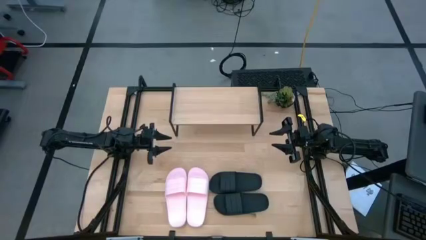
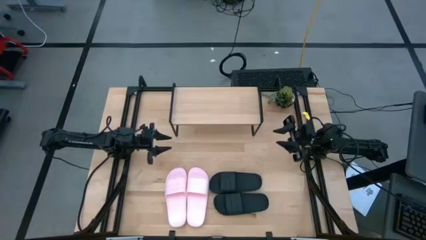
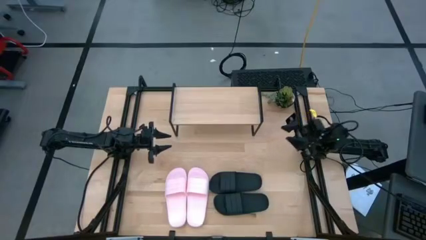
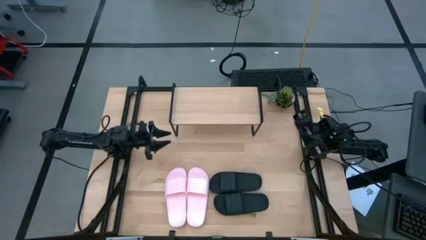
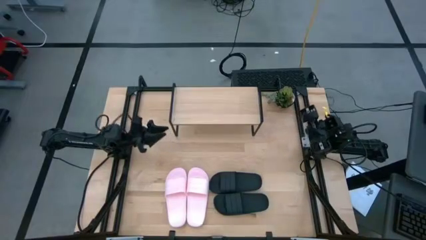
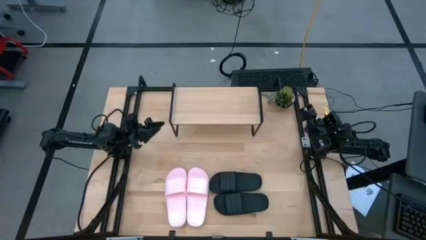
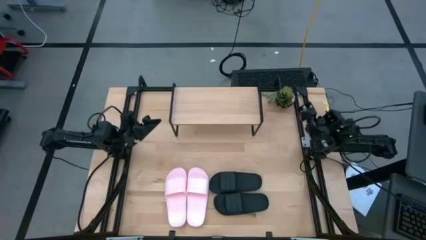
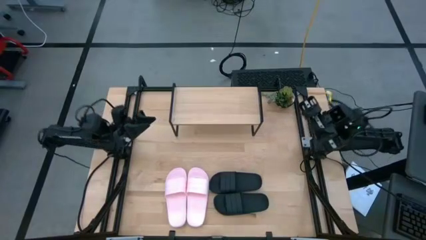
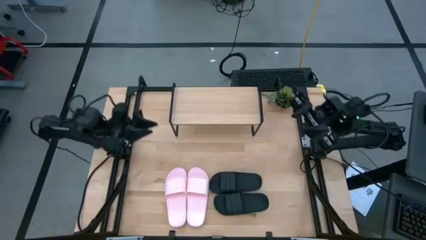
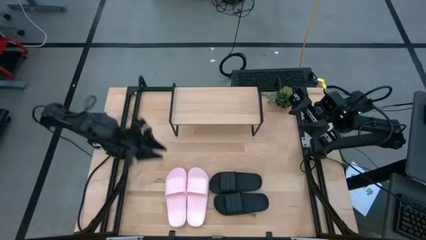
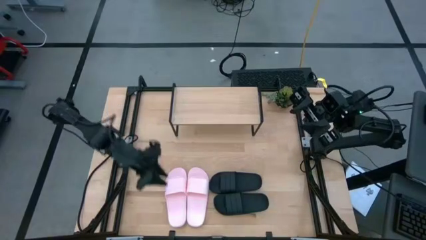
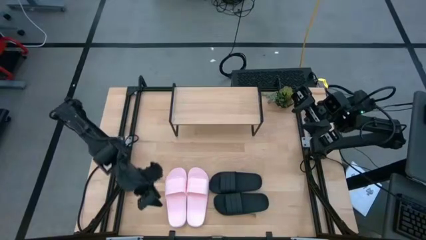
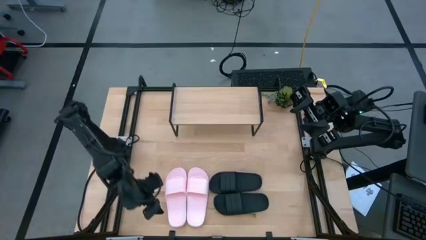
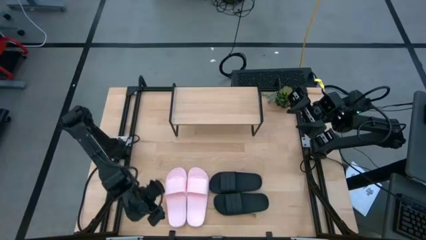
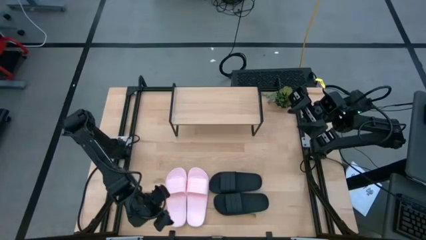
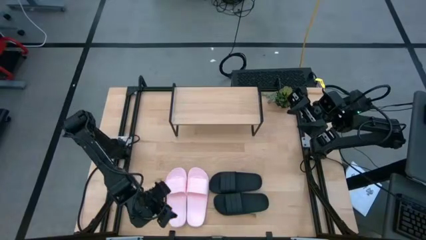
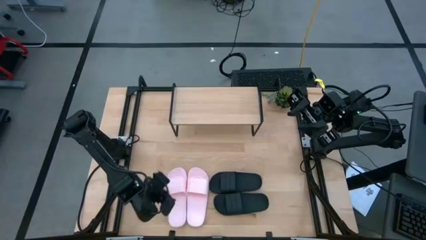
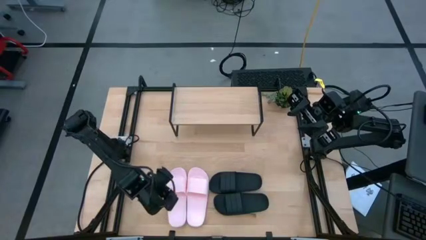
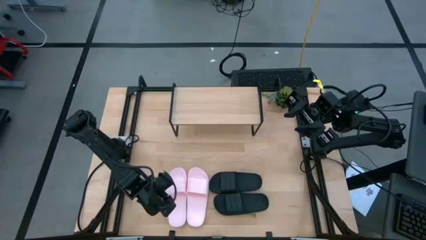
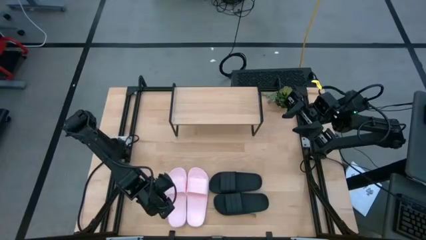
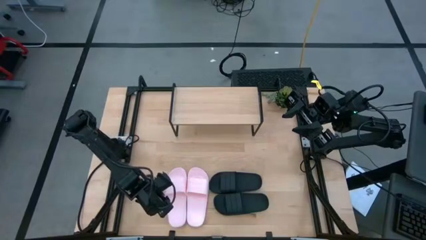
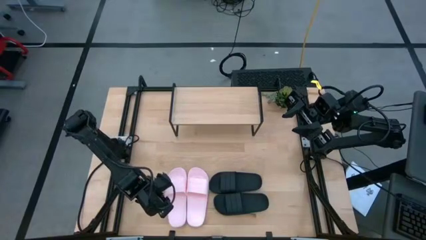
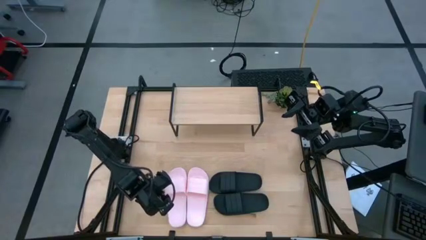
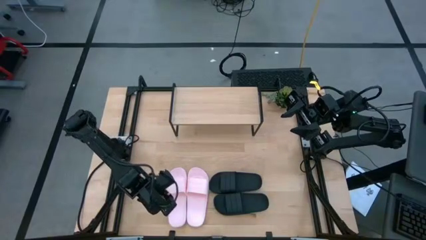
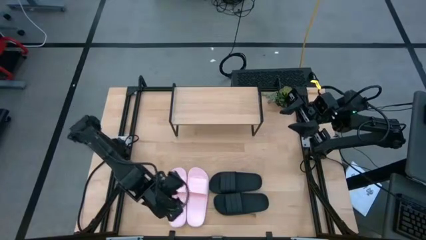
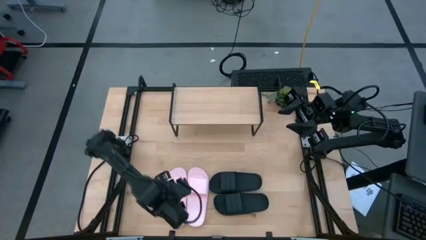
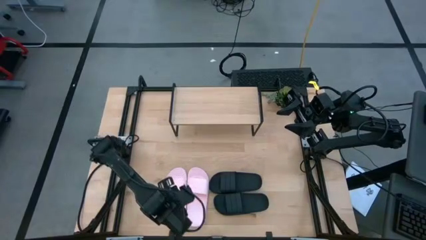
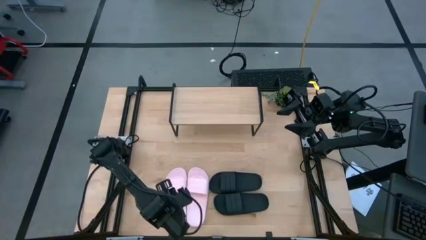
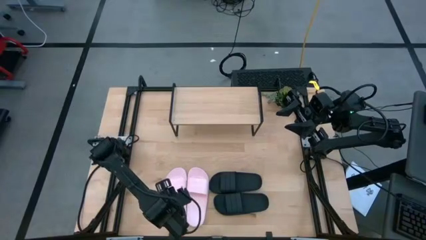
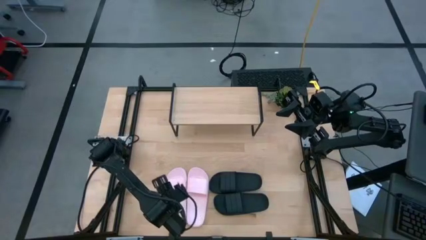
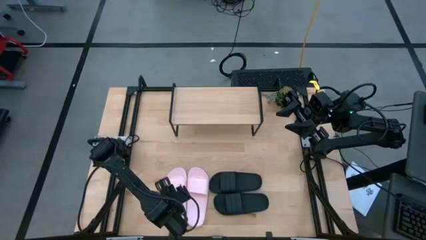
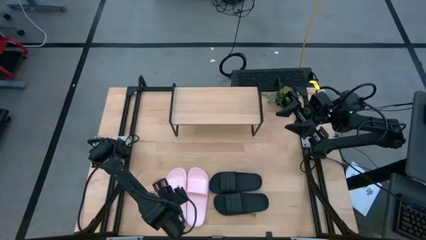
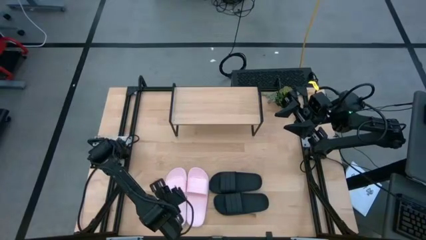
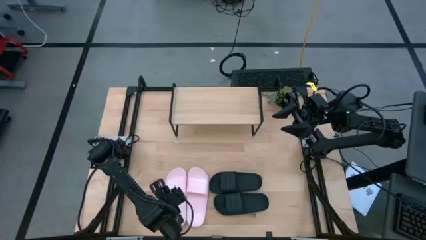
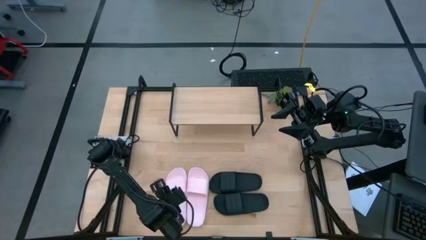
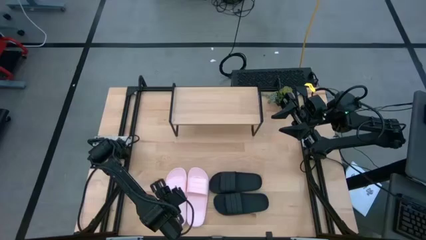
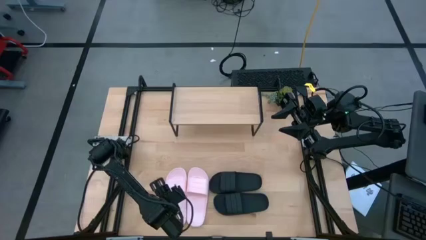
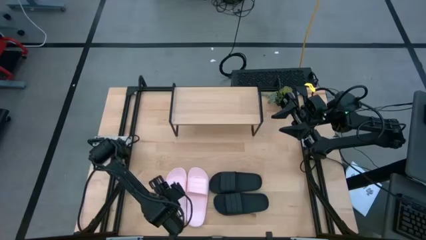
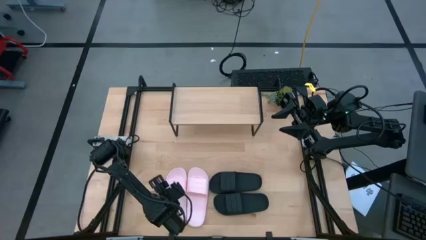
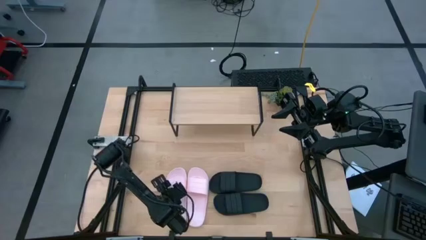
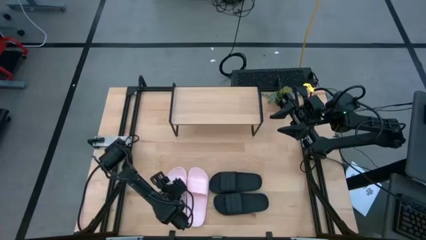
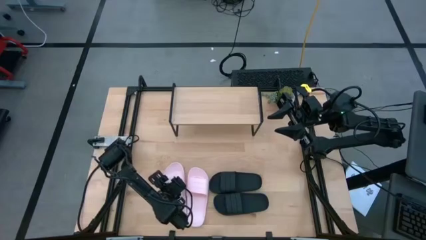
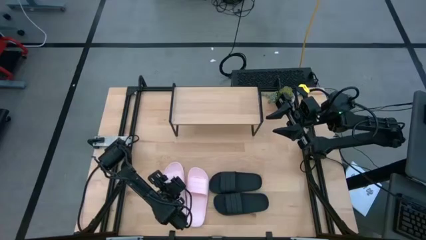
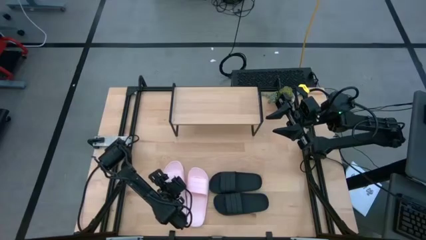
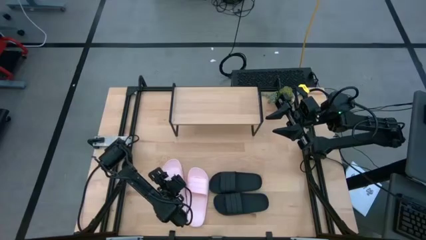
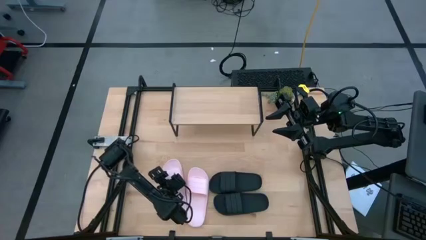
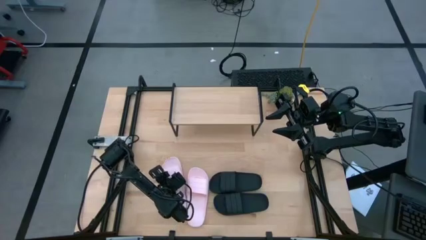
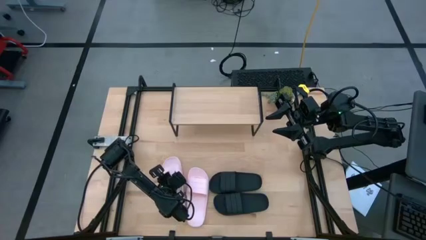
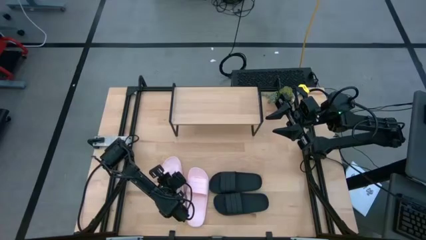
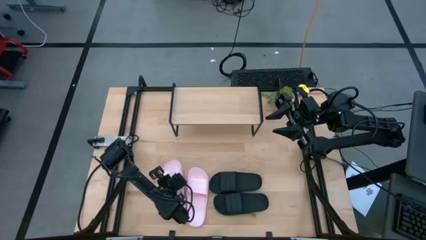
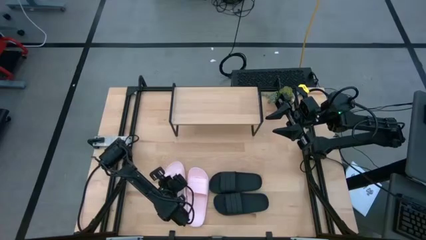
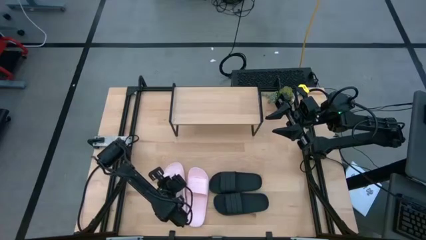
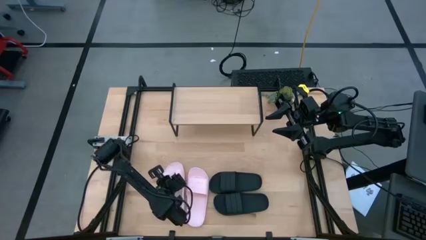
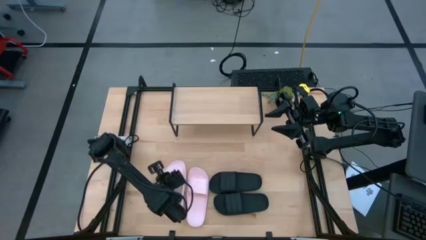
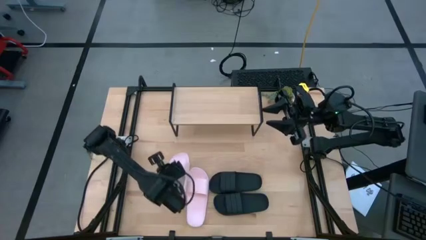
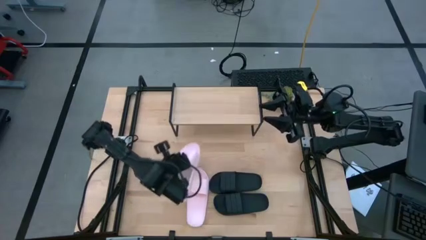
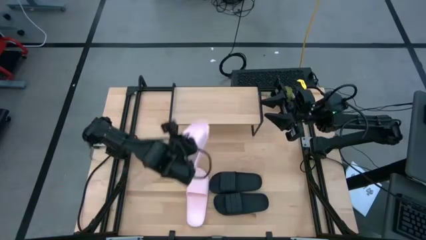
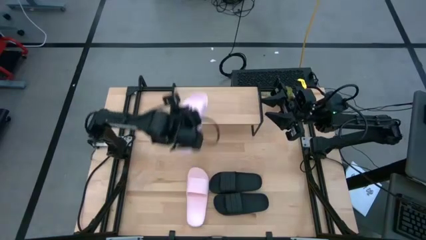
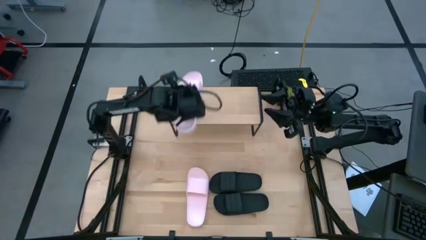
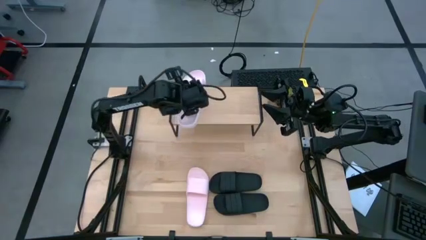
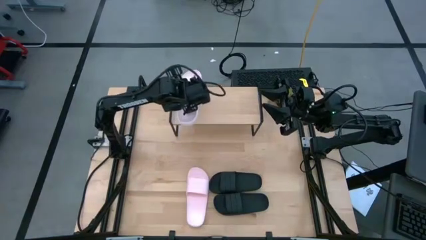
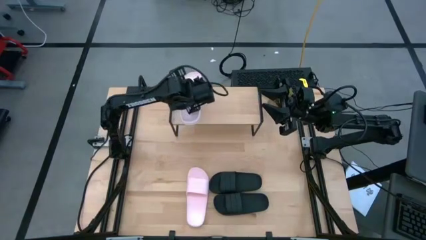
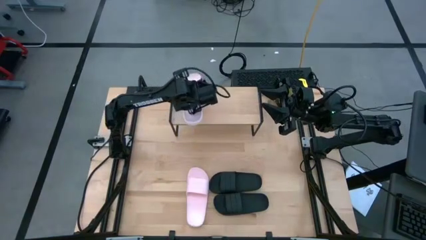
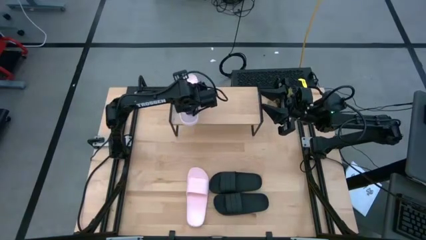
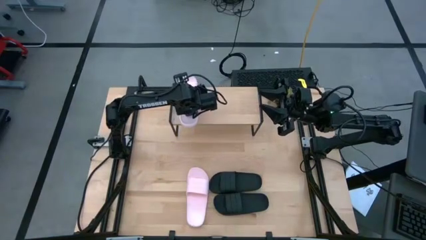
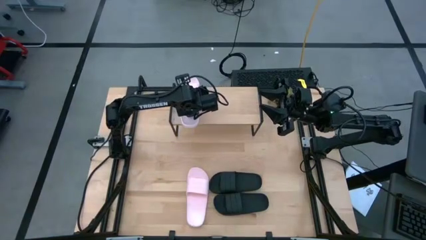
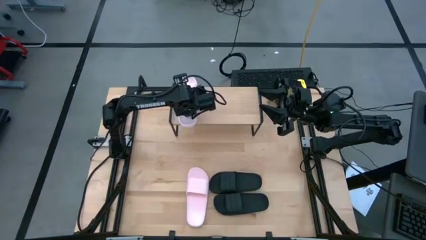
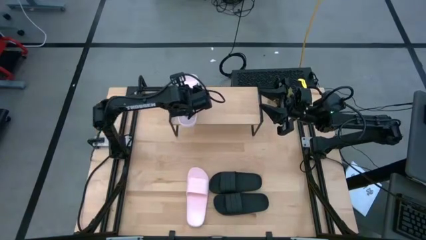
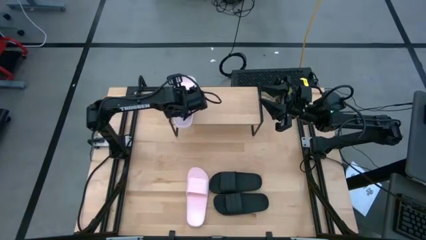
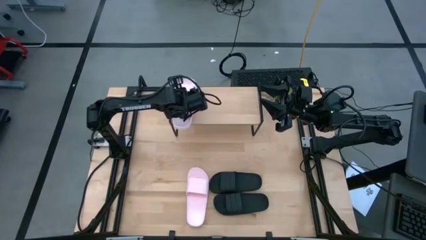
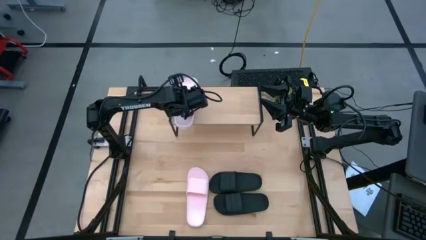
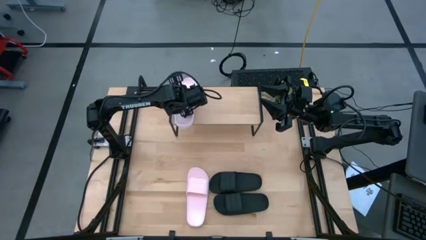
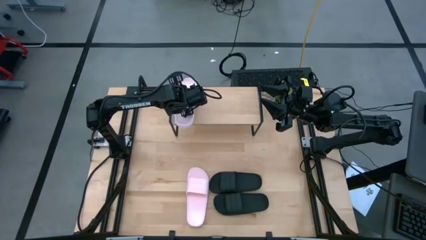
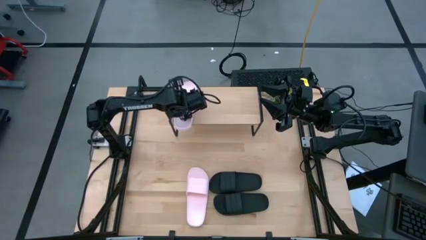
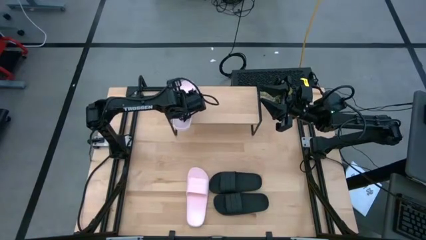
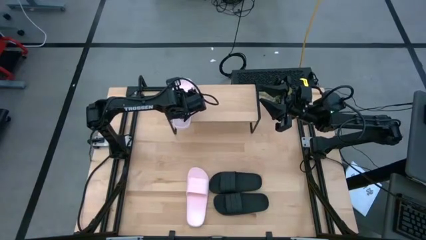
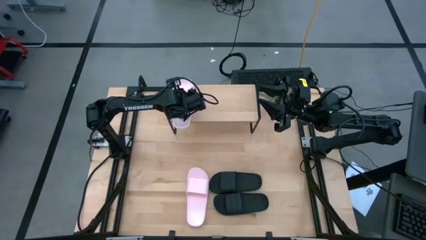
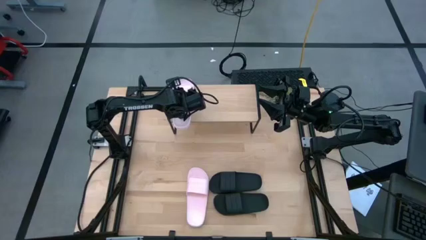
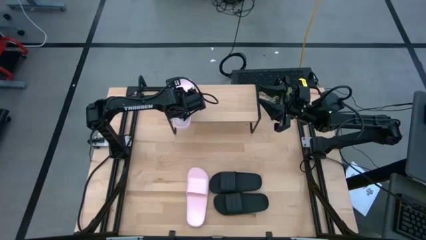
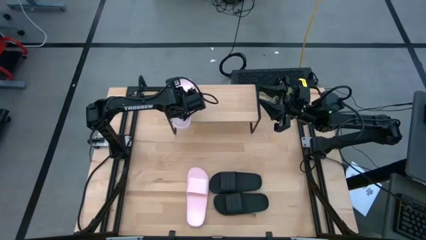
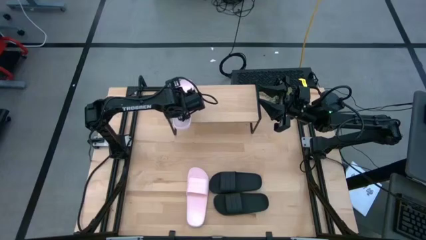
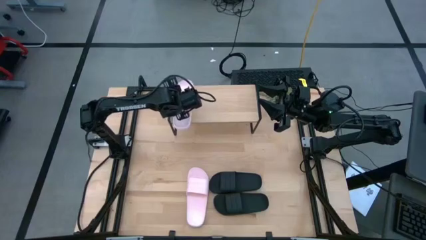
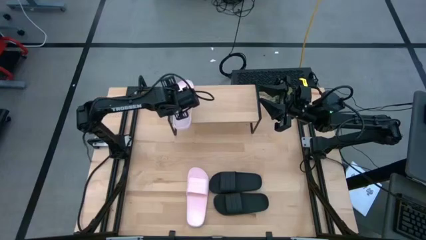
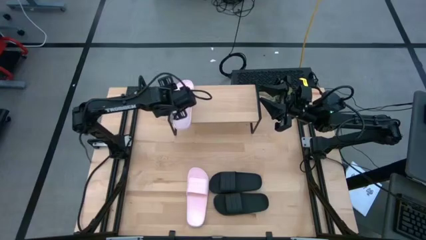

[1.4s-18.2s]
Task: Pick and place slides into the shelf
Put the left pink slipper on the shelf
